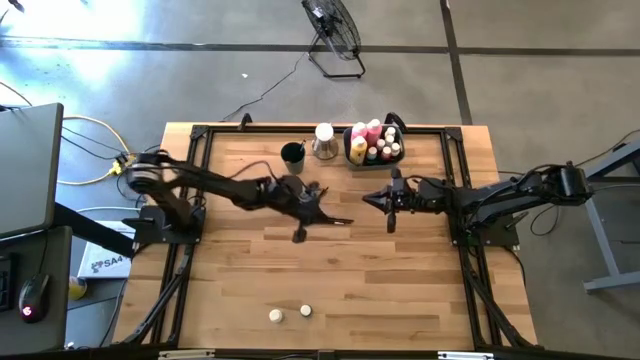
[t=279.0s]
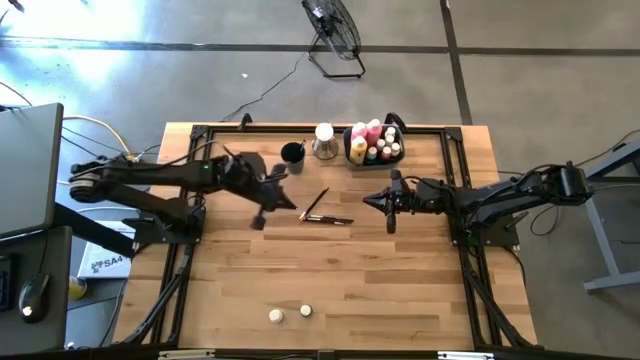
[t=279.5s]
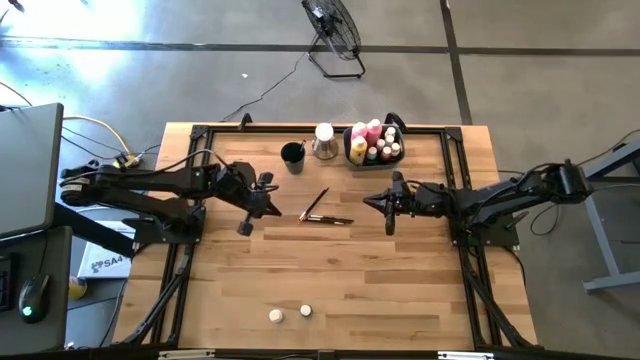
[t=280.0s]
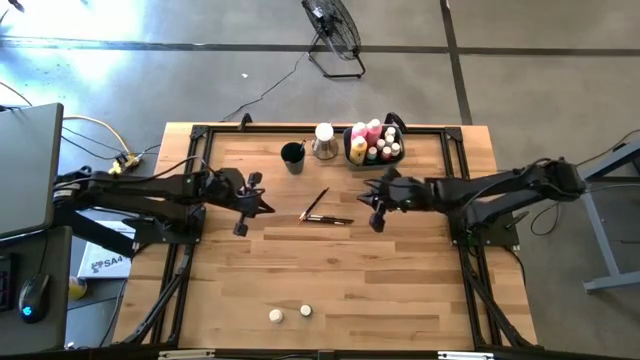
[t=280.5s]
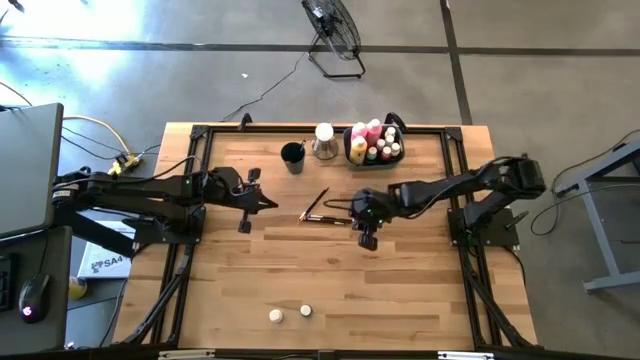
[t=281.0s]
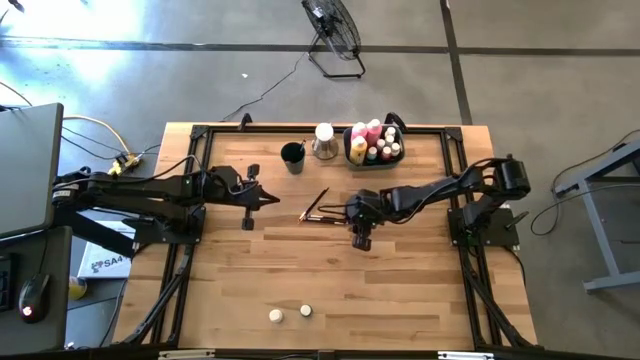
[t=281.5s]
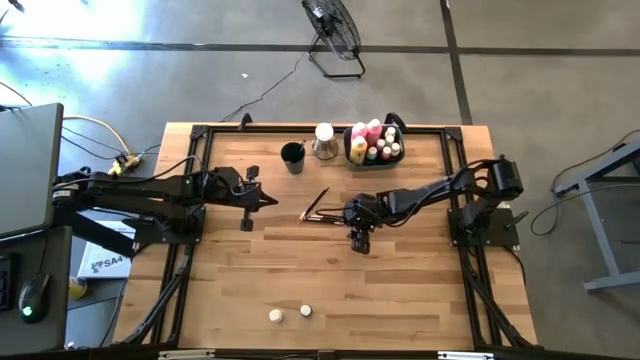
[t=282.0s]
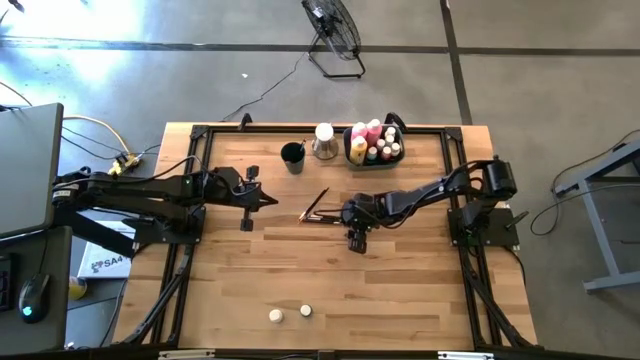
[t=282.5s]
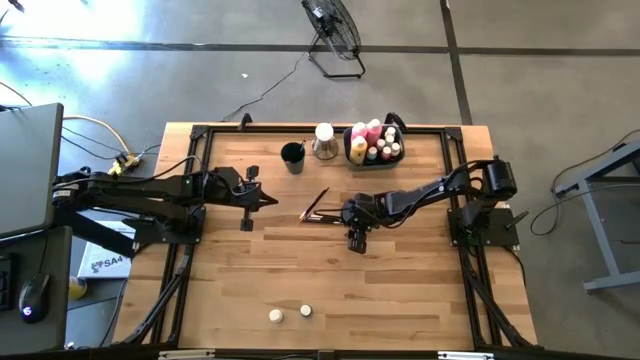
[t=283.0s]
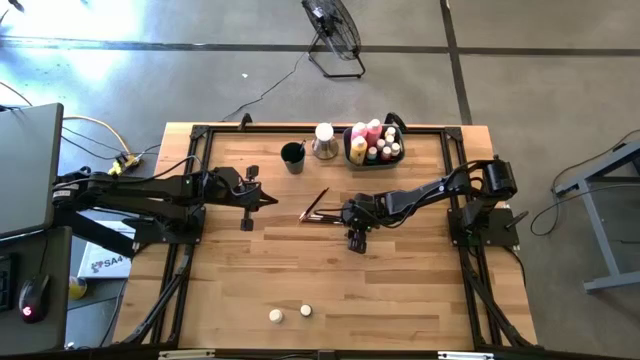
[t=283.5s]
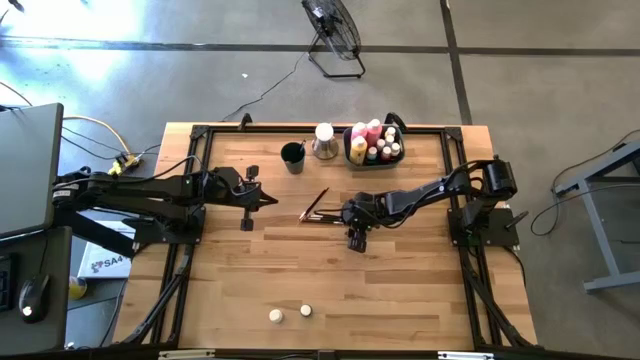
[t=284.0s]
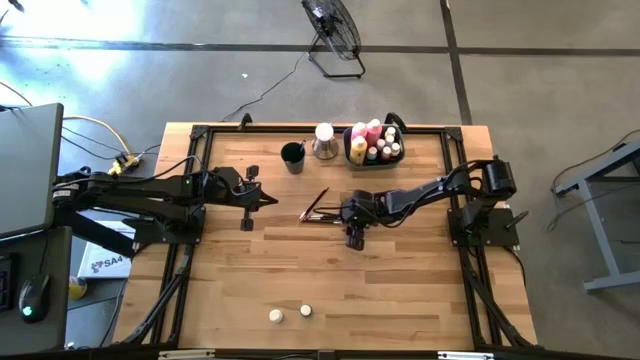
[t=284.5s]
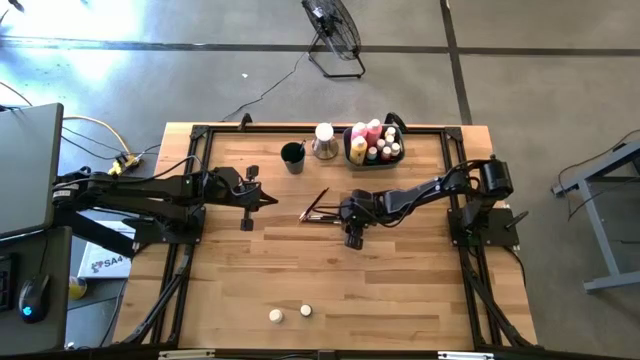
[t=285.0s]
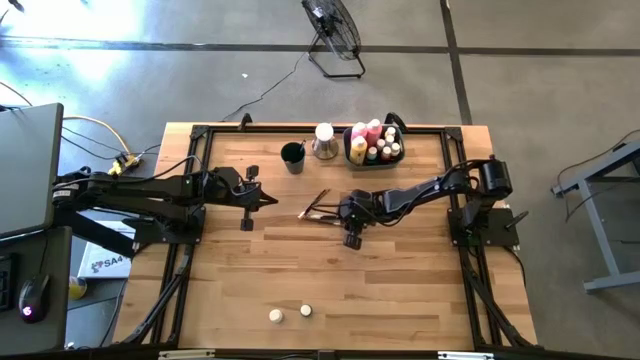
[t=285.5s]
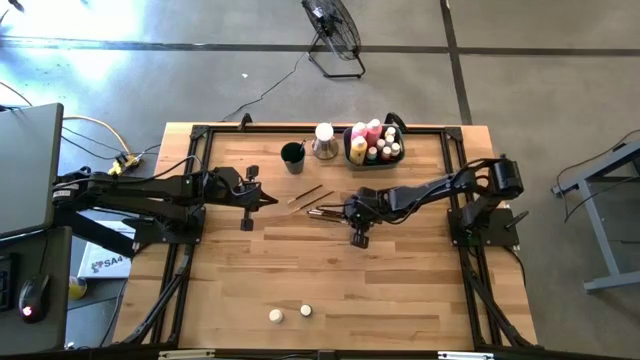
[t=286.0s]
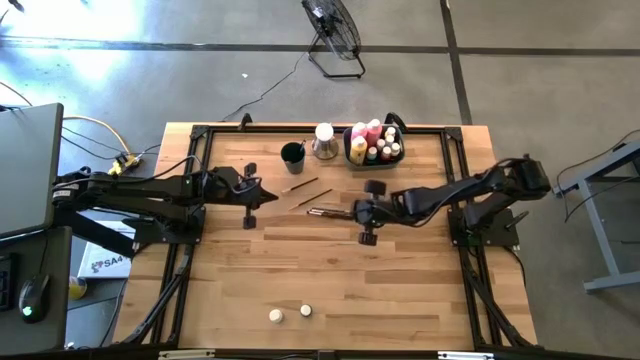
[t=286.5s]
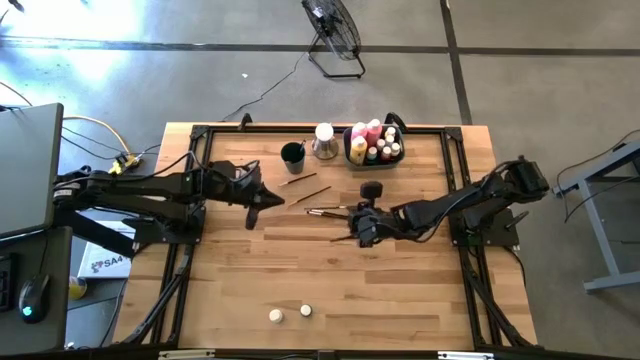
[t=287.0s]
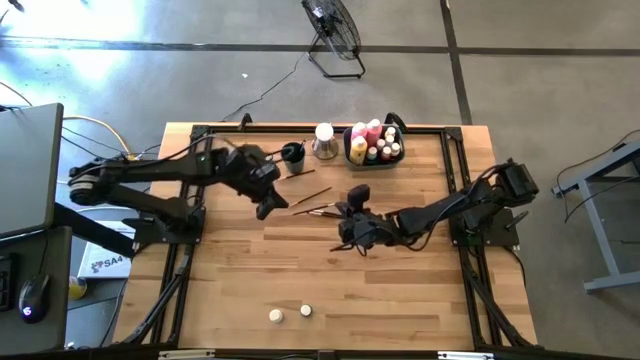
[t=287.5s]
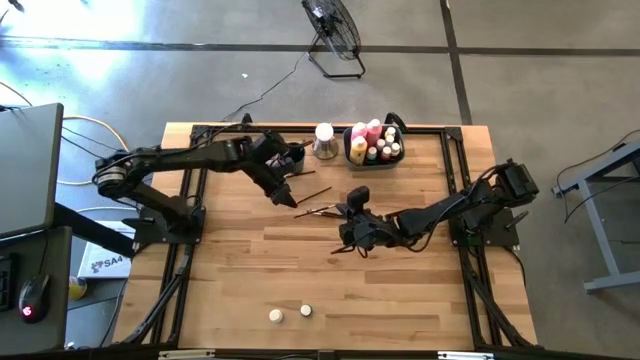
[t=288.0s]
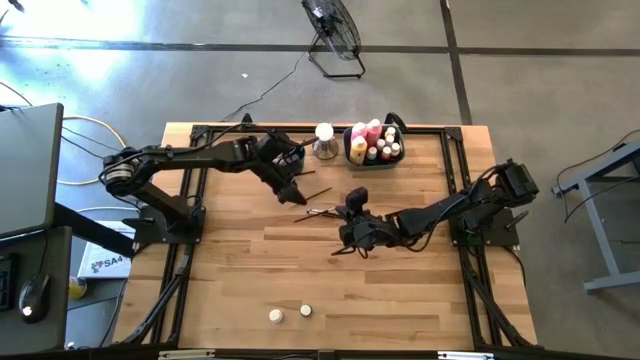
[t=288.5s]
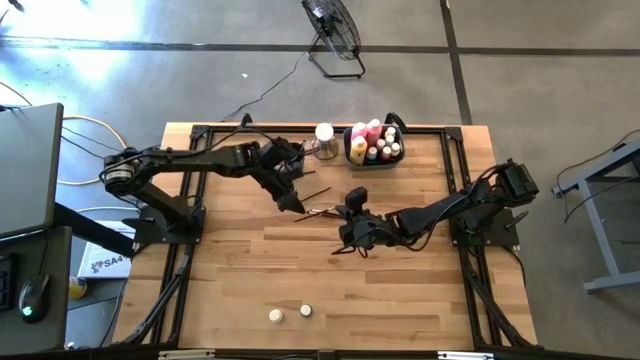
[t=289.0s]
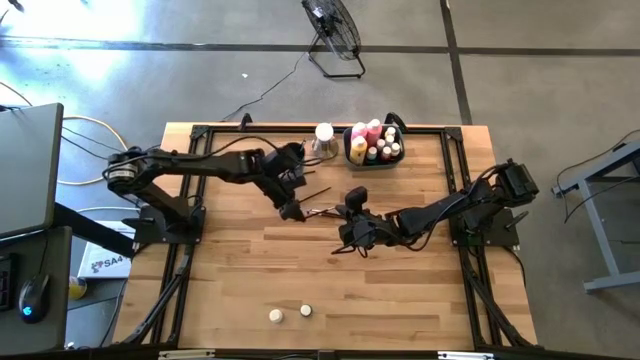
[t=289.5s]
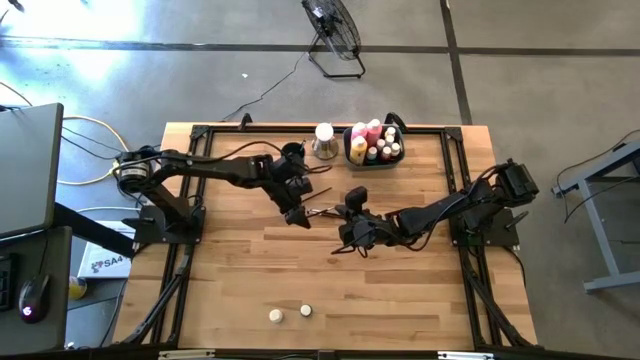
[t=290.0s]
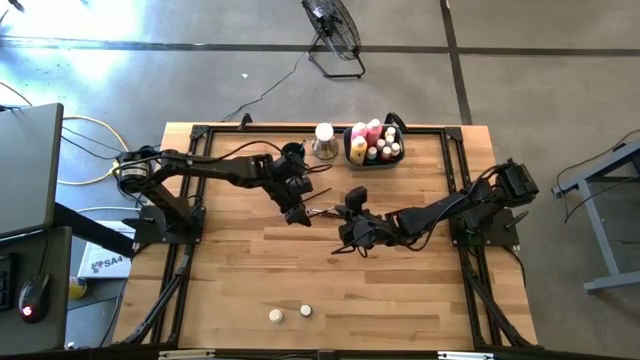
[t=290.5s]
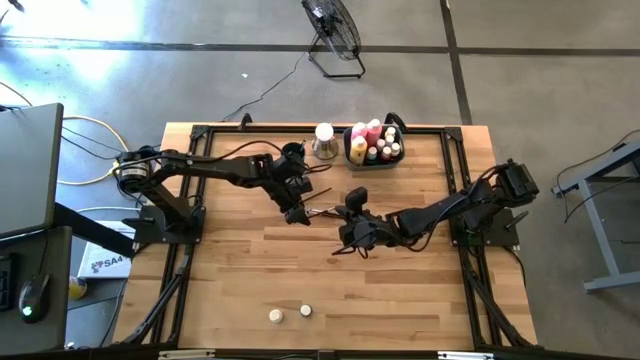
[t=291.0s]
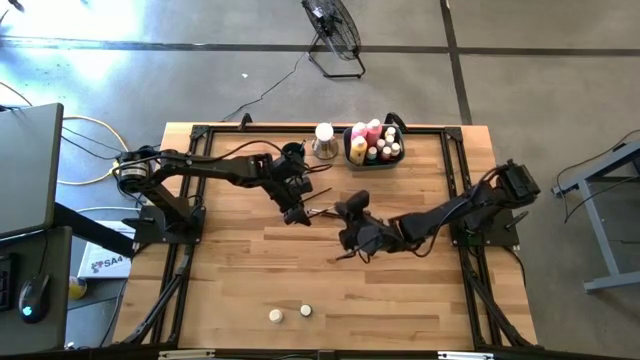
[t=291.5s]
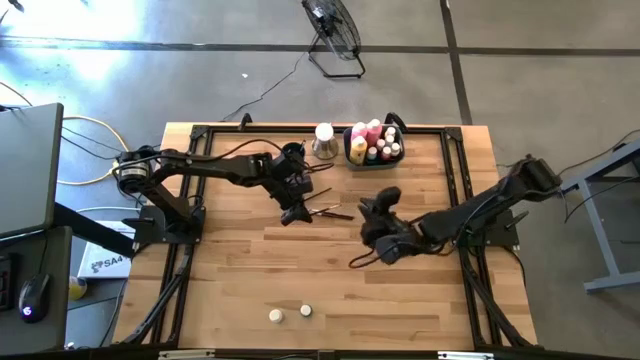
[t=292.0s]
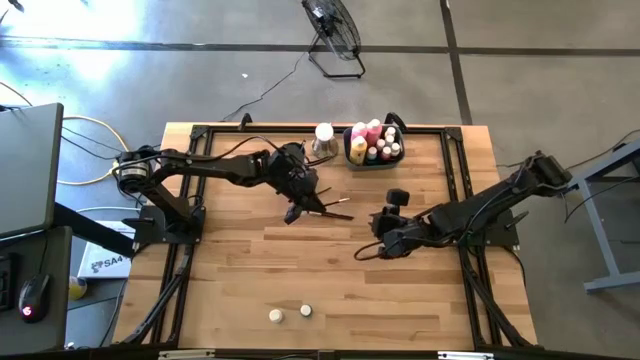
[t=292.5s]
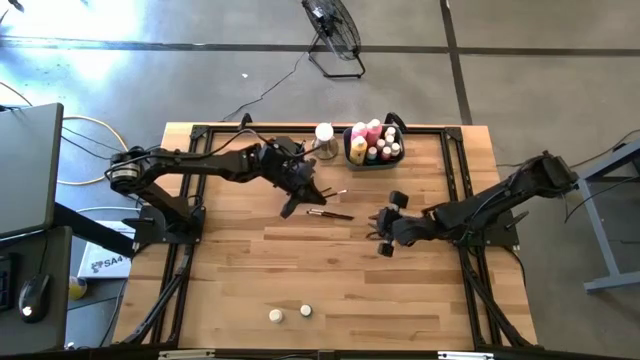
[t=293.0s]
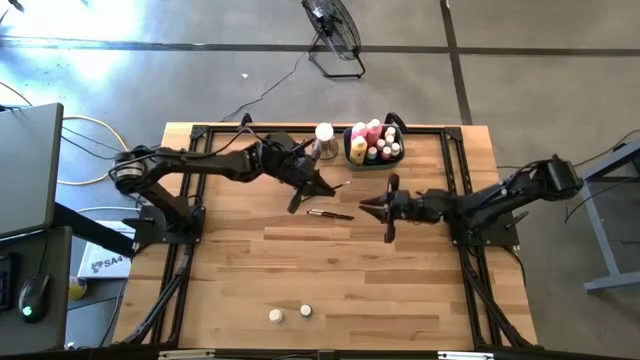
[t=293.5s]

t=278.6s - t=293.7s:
Task: Pick & Place Paint Supplies
Put the silver paintbrush into the blue cup
